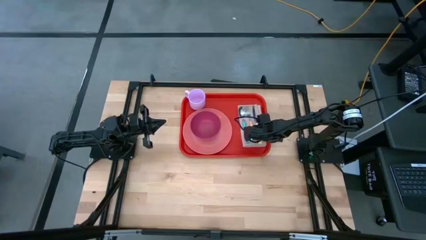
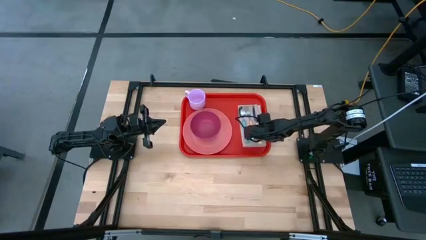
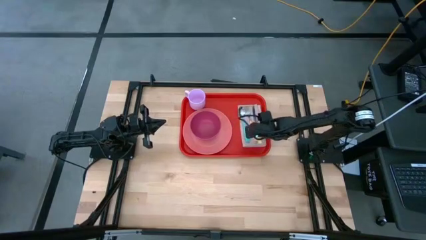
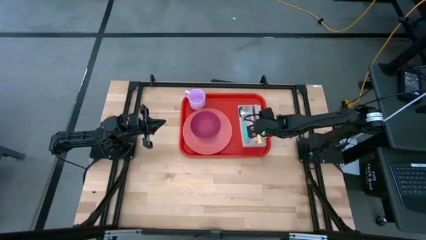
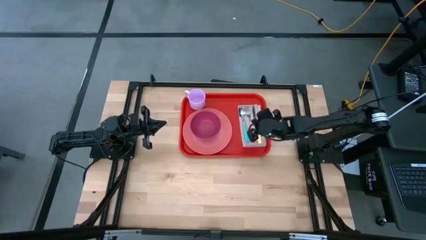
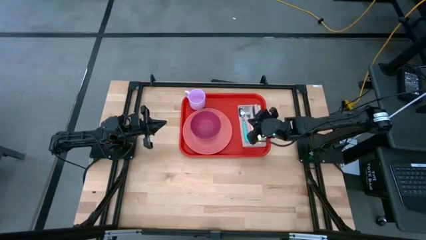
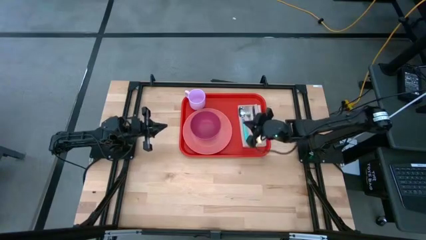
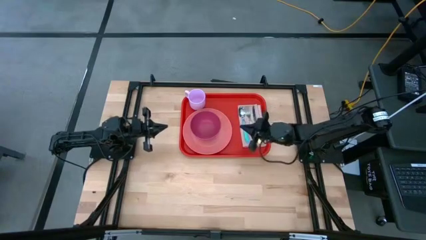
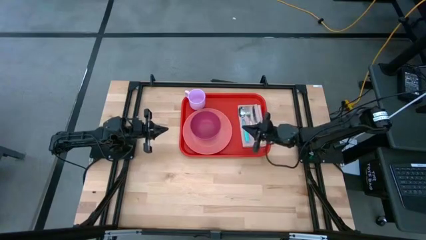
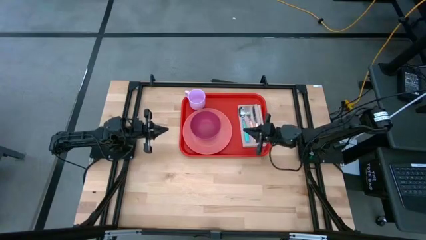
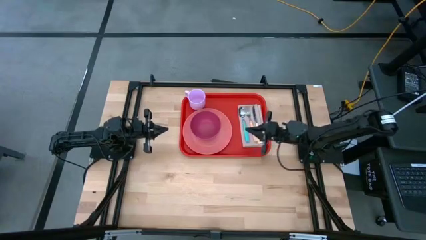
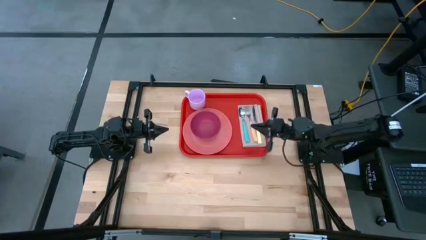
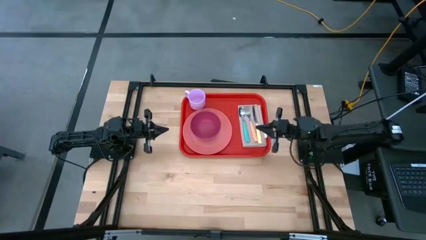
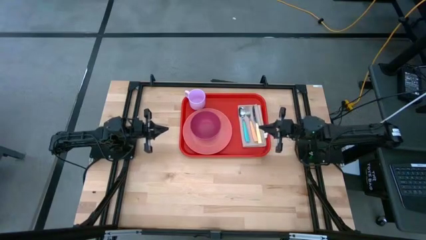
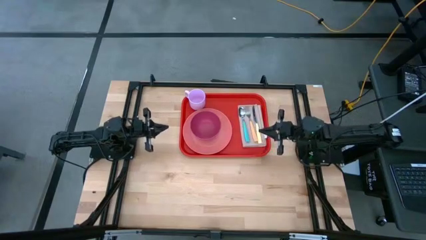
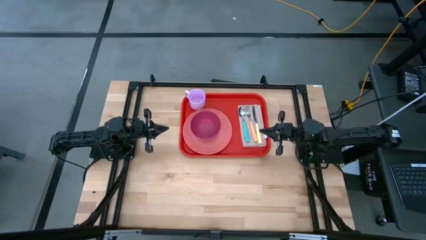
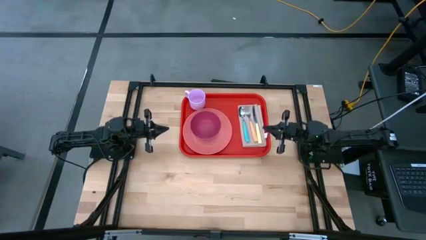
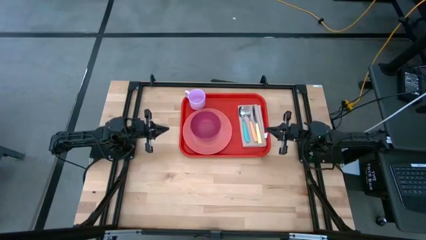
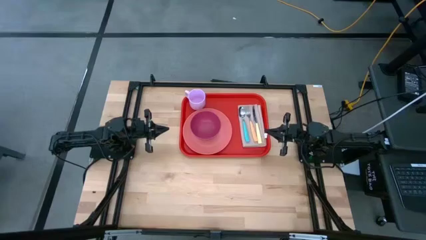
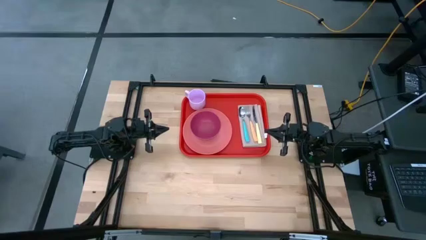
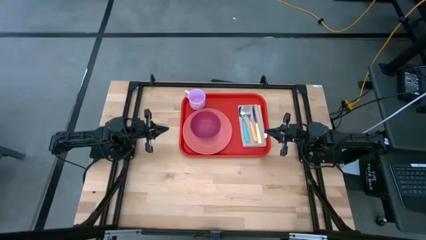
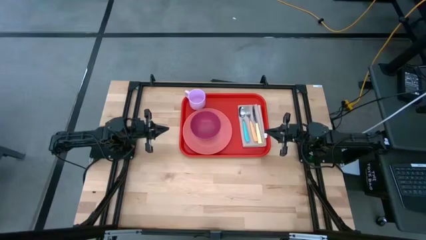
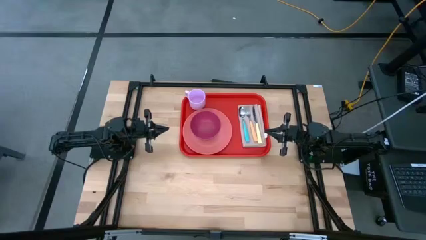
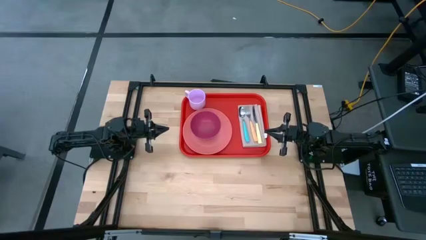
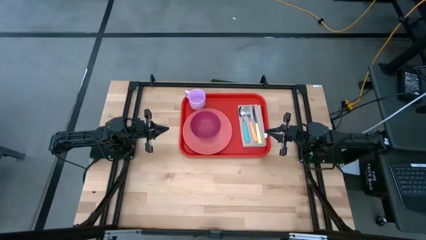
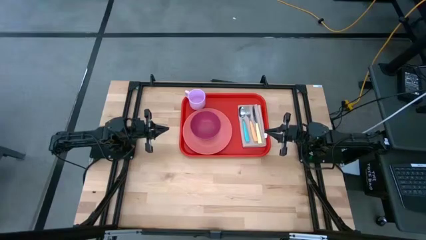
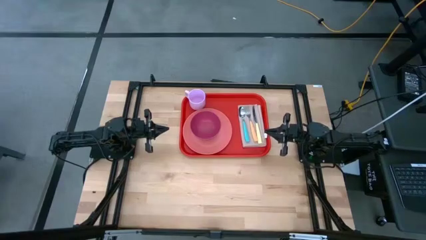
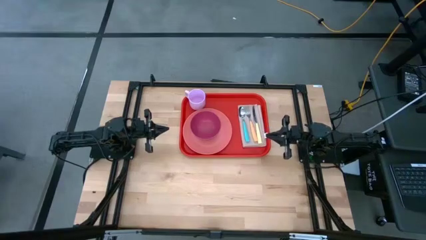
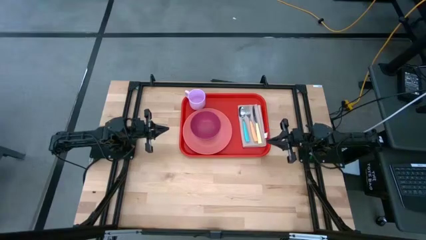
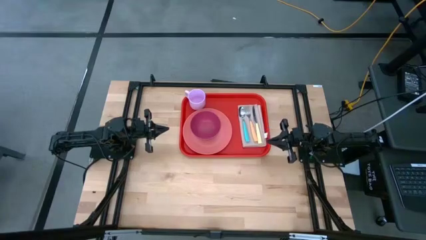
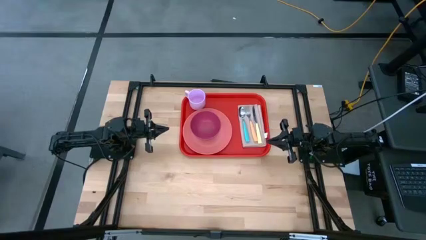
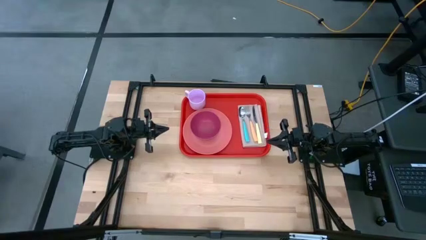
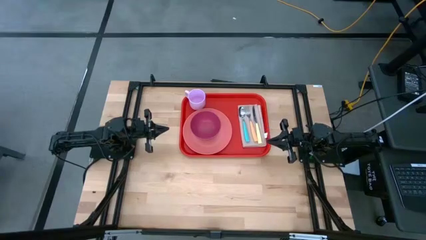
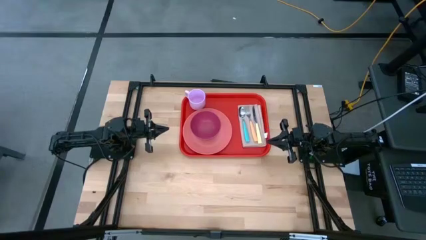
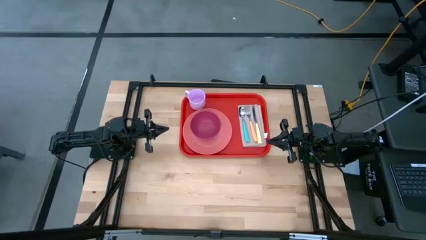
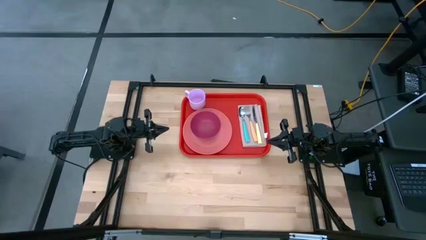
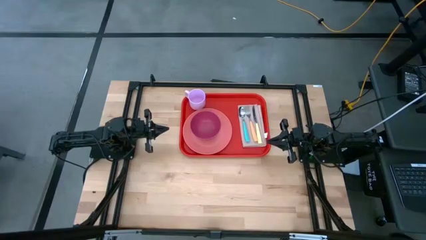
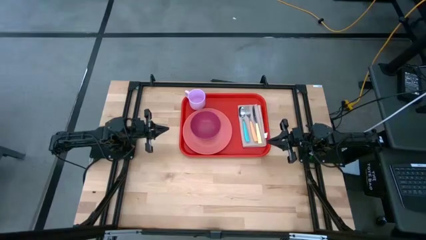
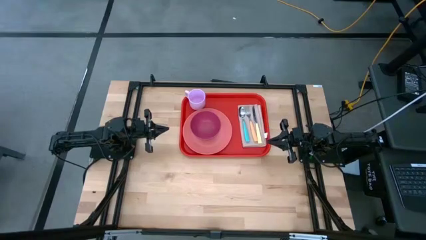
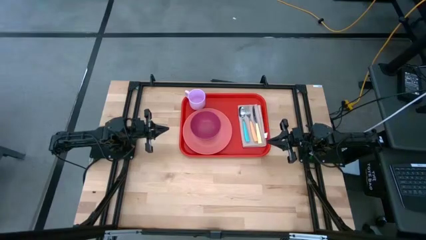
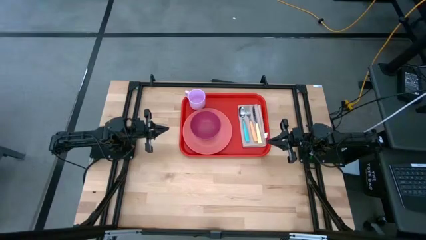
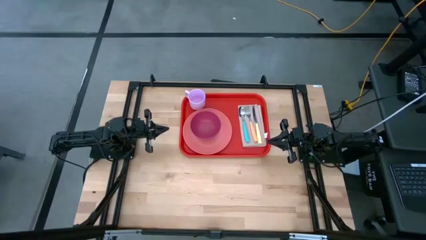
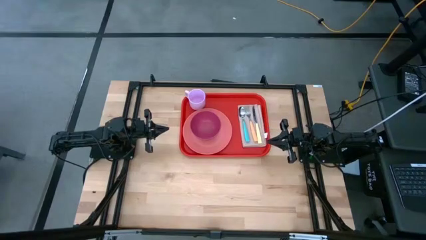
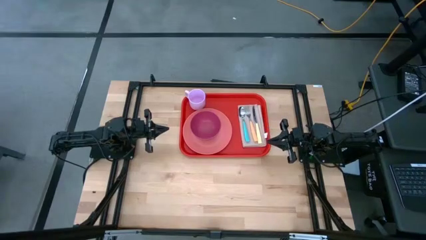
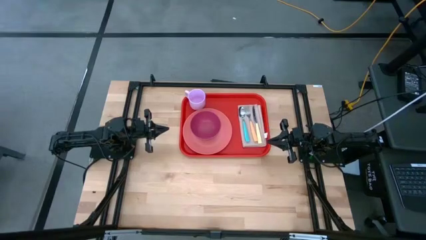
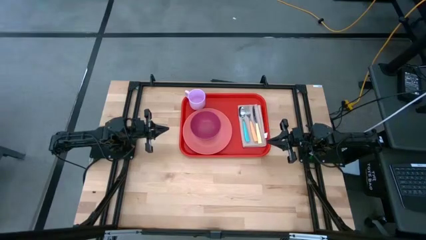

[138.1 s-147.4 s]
Task: Set up tray
Return to Home Position

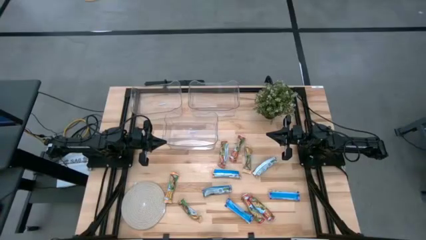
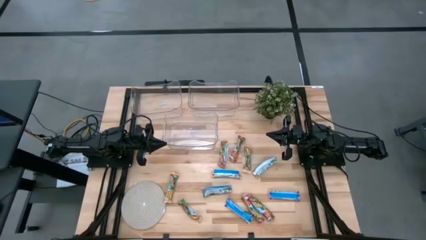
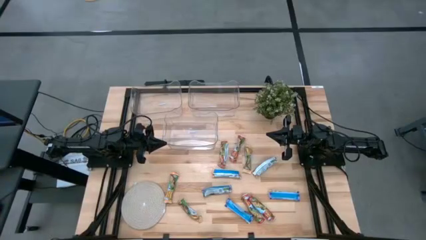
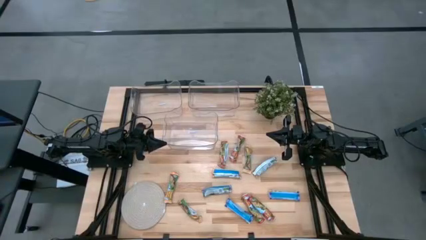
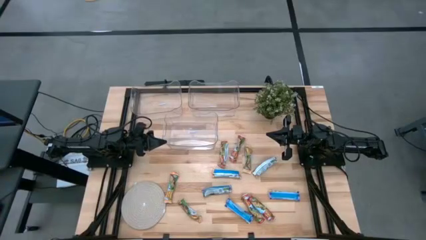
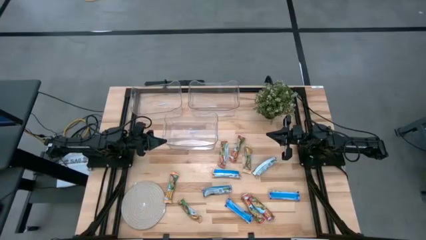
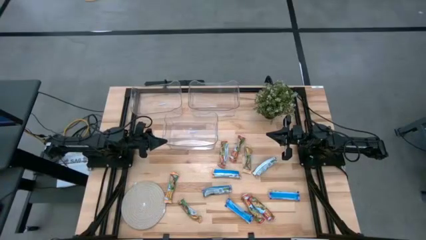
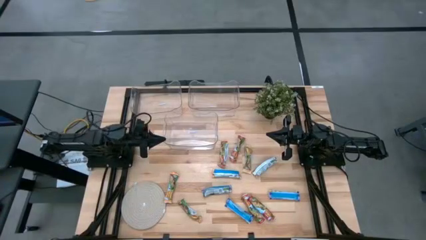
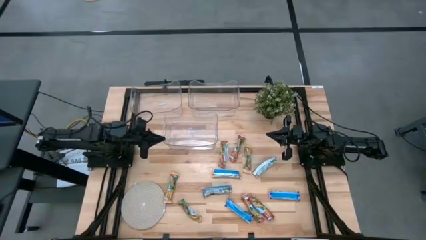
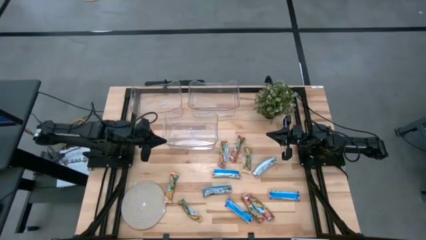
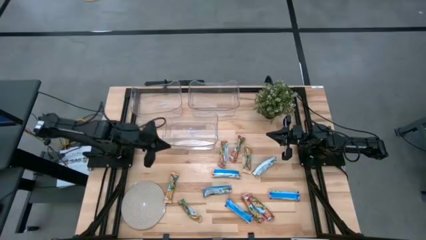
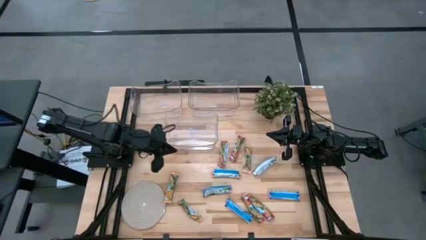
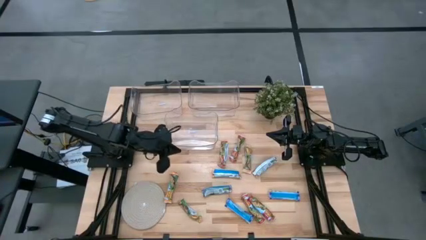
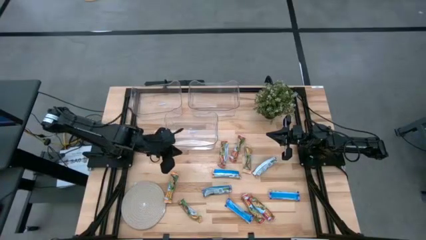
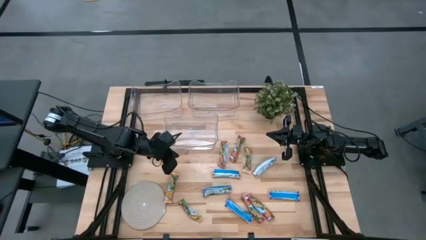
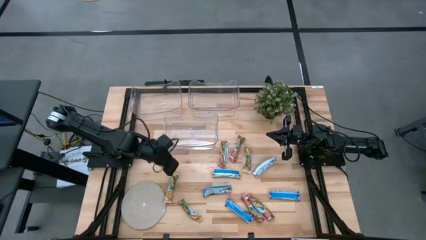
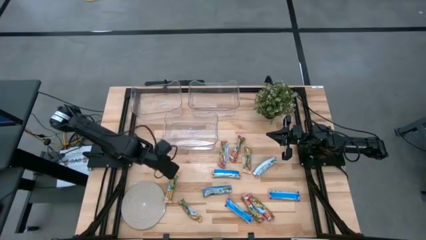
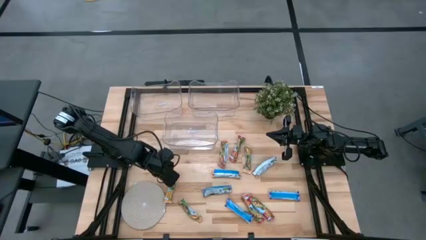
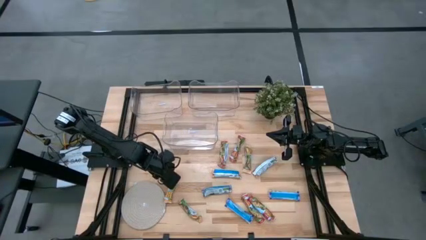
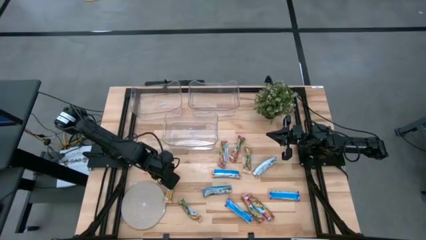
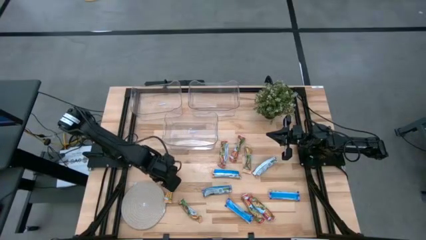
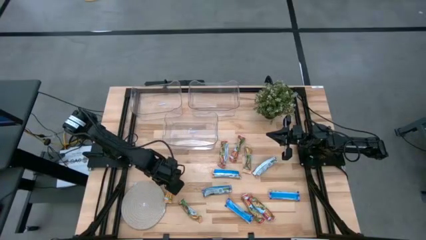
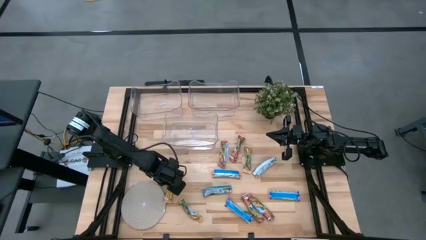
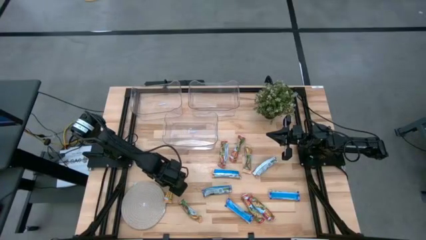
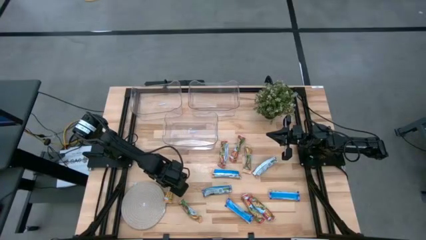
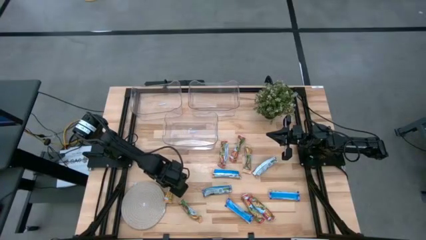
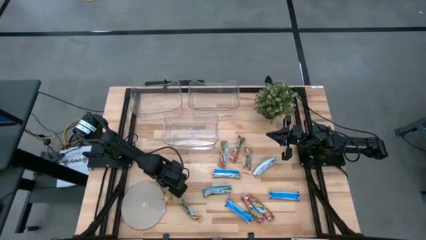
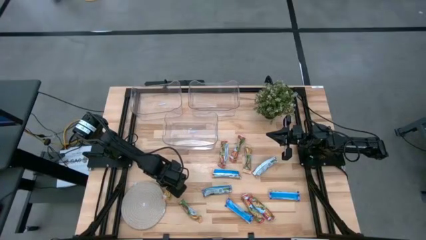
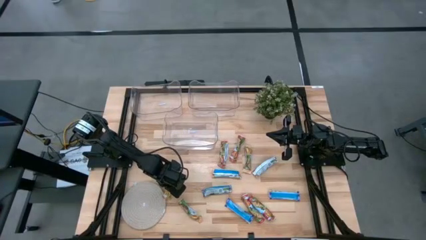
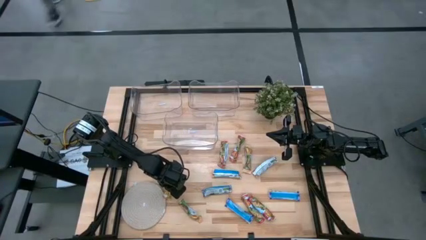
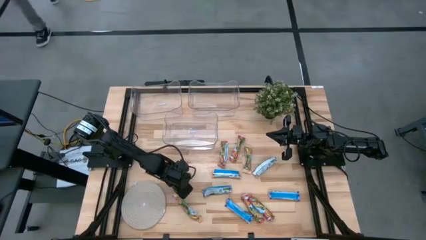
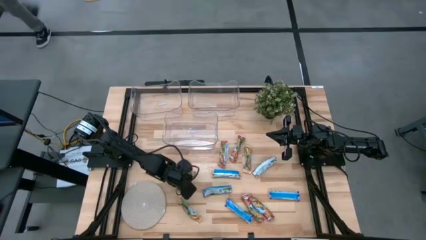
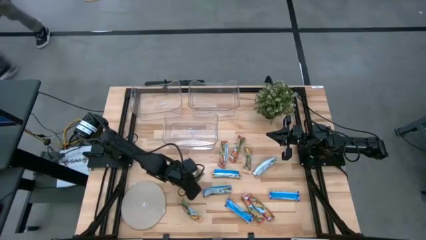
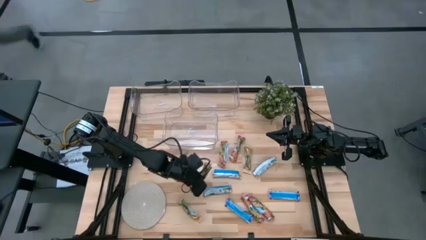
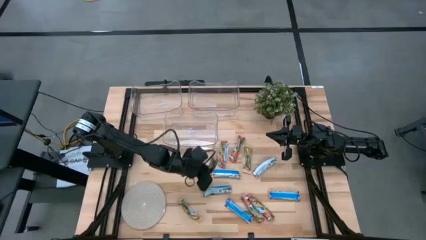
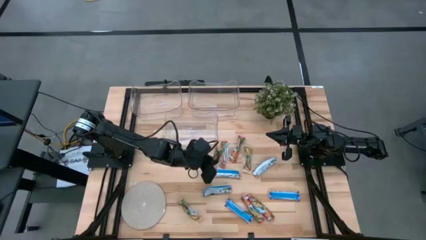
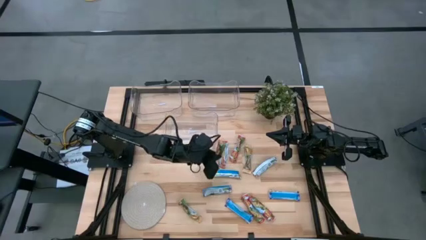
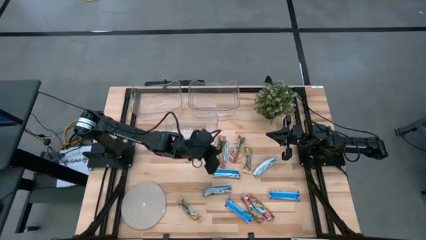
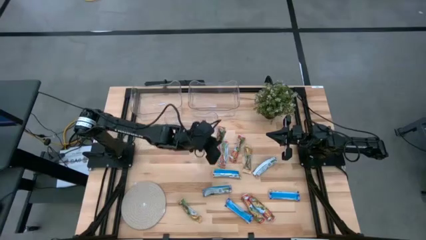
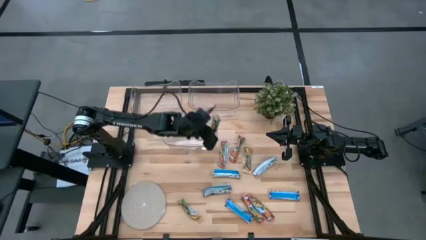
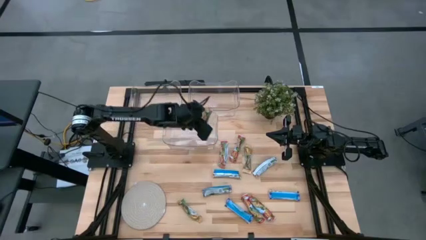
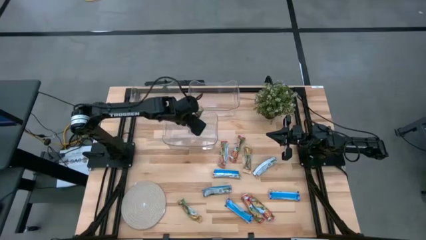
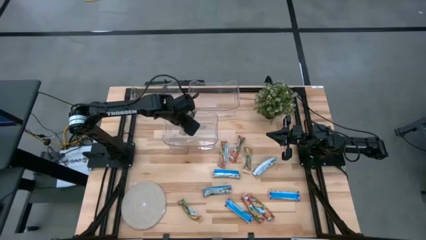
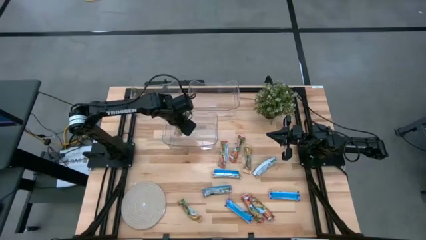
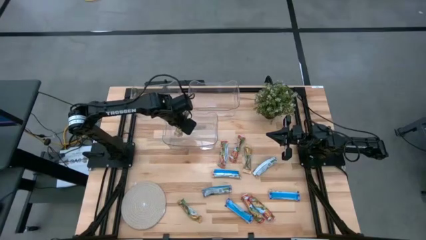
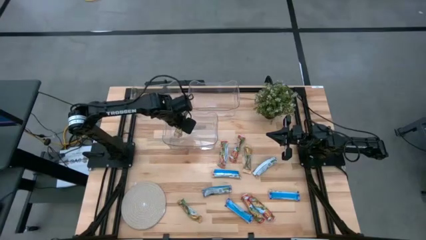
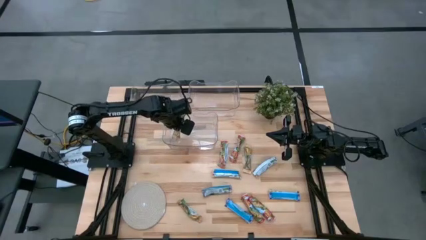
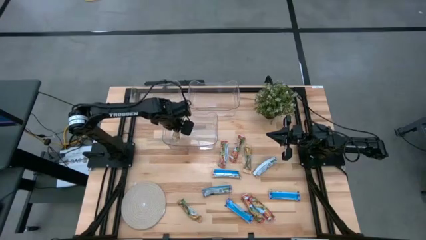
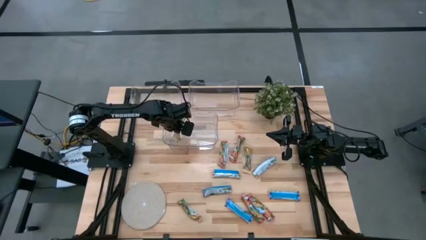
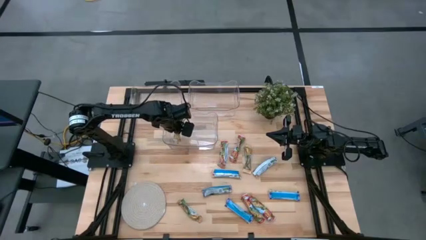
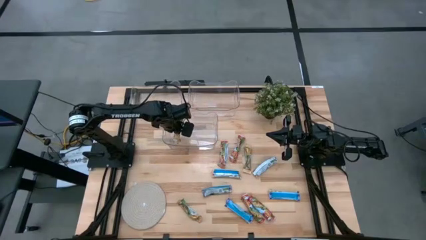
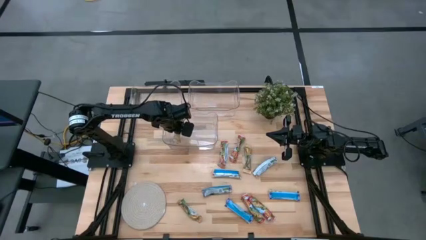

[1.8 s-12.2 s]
Task: Pick and place Granola Bars by type
Put the orange granola bar into the bottom transparent bin
